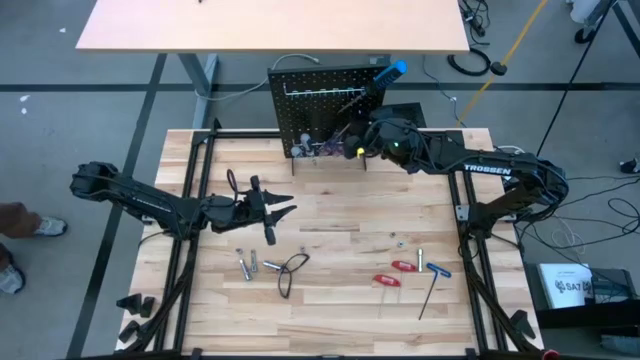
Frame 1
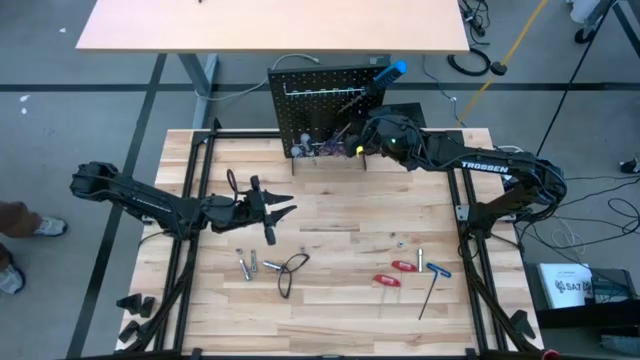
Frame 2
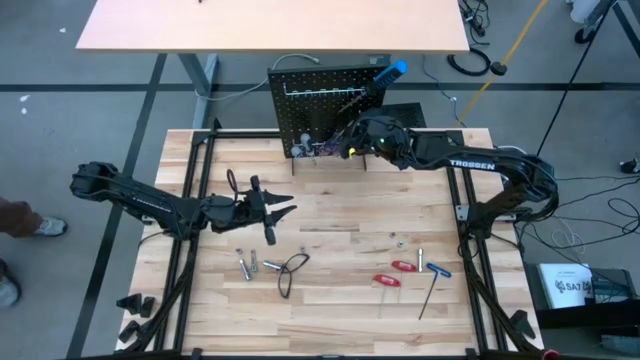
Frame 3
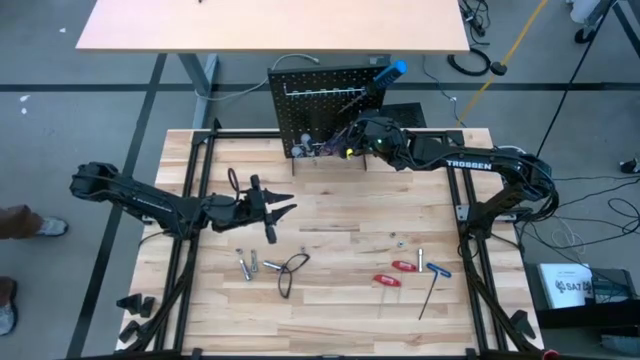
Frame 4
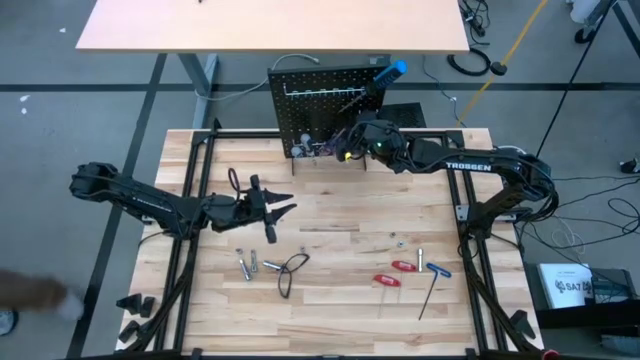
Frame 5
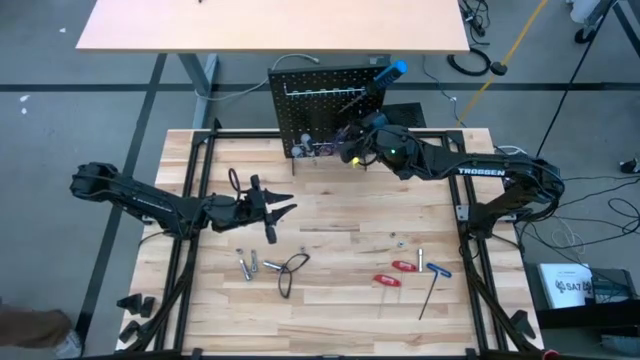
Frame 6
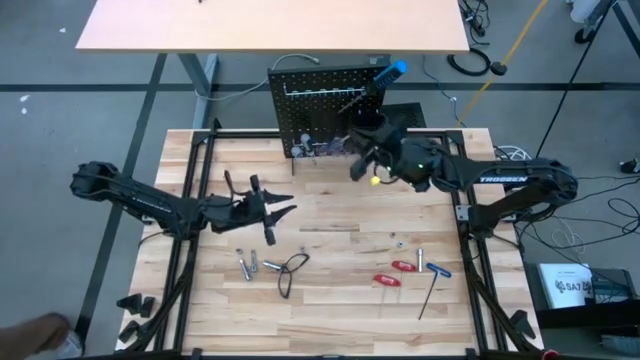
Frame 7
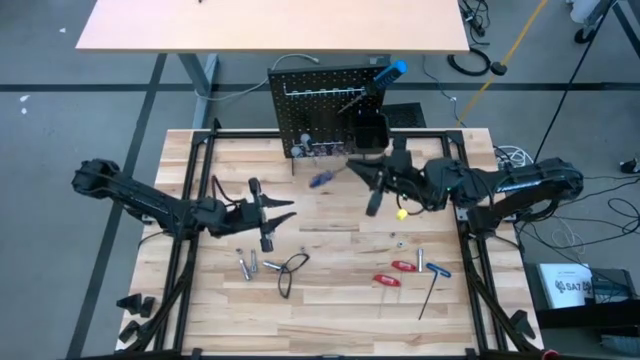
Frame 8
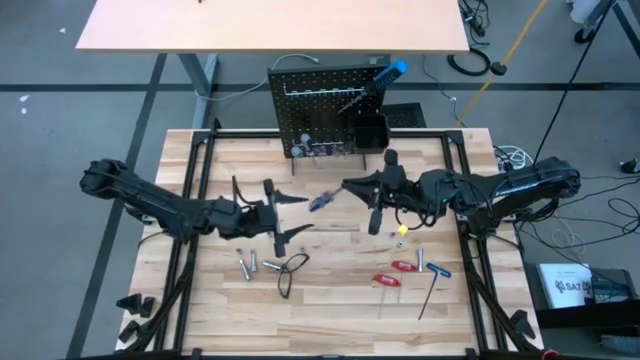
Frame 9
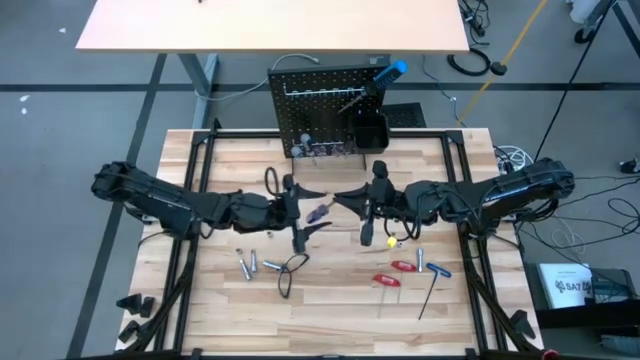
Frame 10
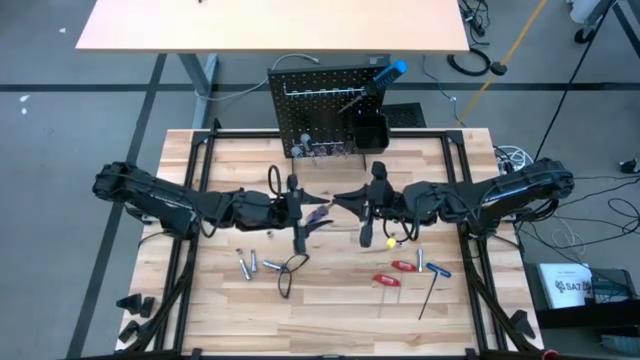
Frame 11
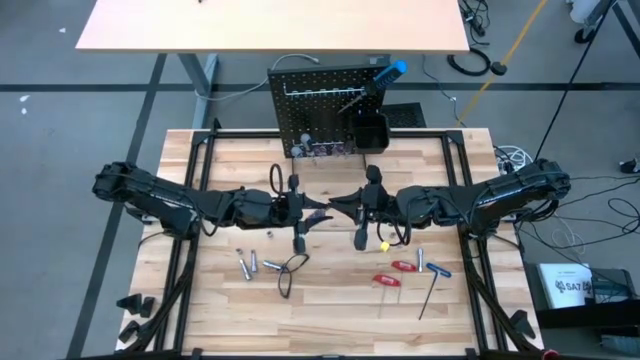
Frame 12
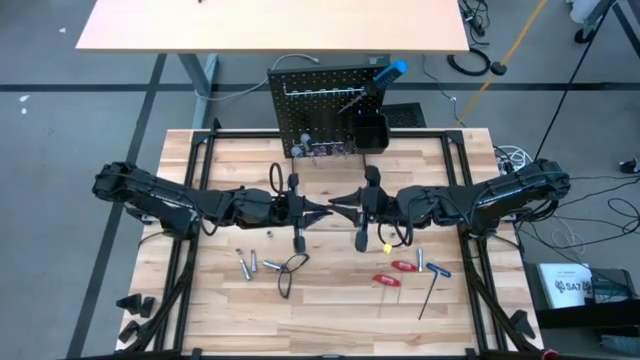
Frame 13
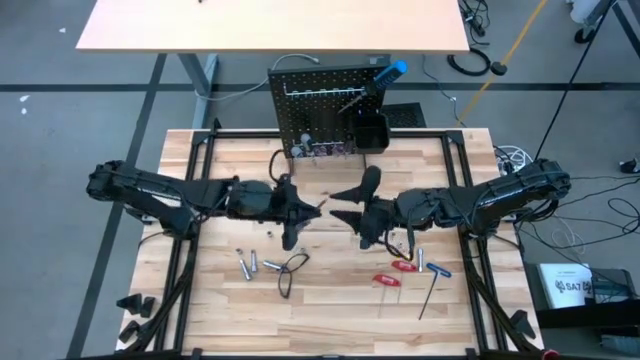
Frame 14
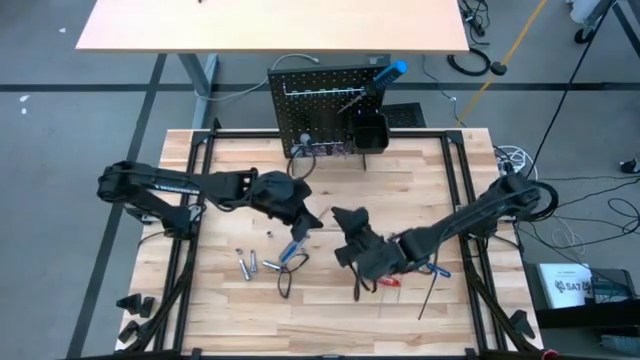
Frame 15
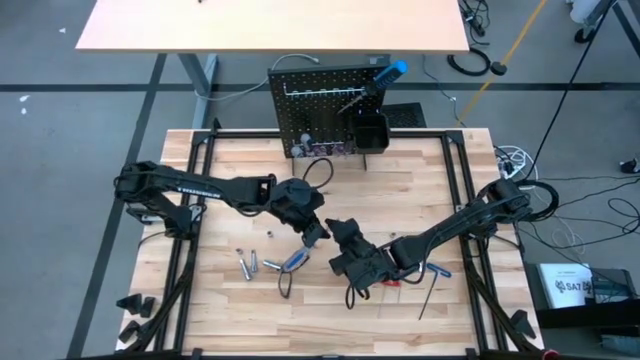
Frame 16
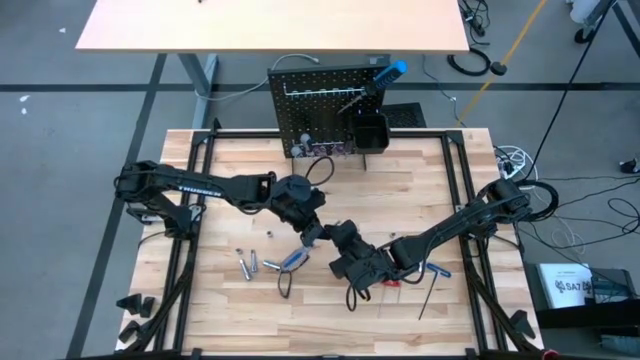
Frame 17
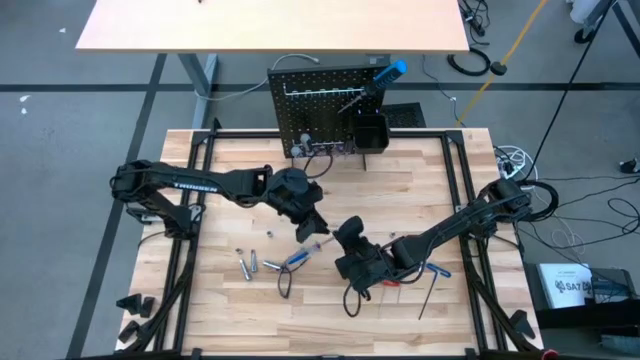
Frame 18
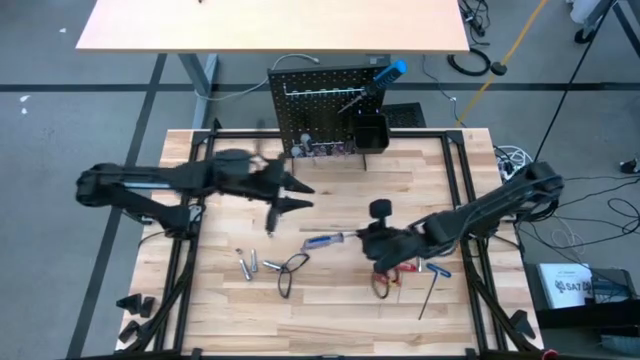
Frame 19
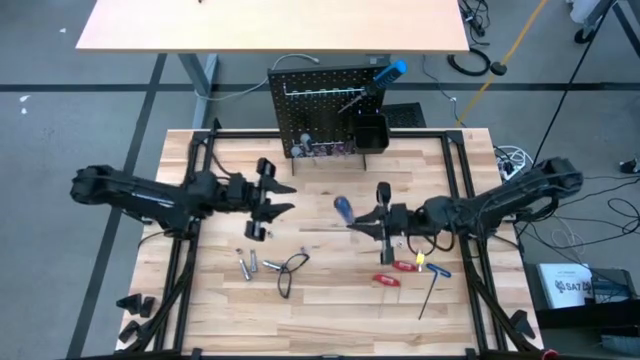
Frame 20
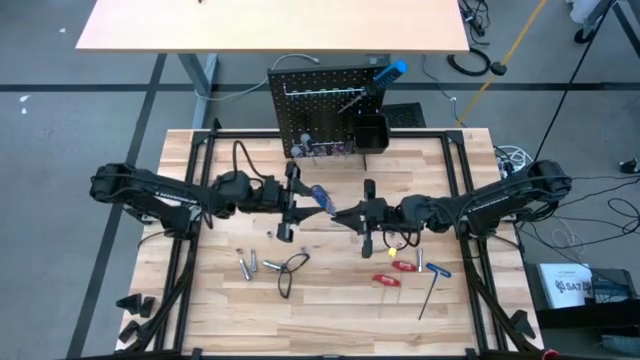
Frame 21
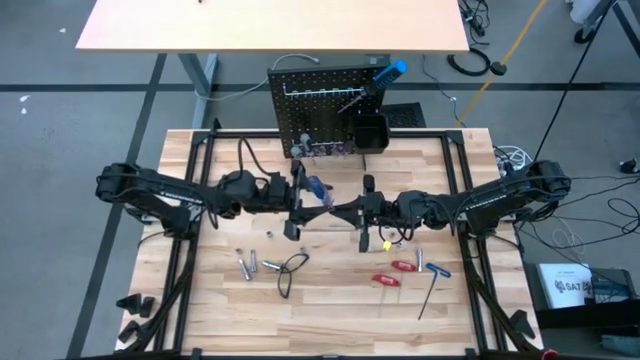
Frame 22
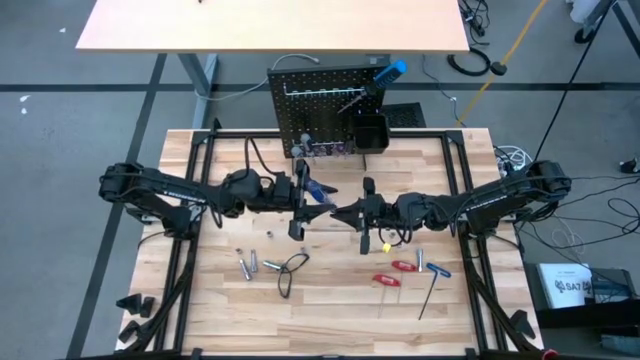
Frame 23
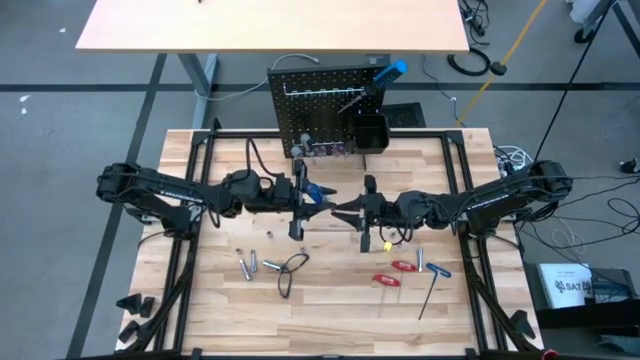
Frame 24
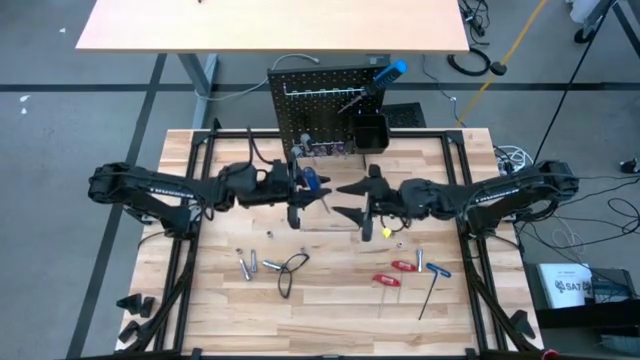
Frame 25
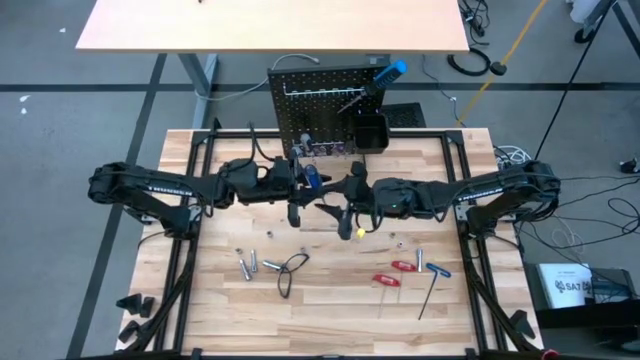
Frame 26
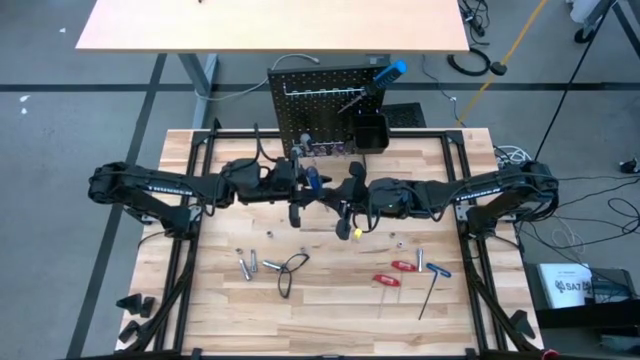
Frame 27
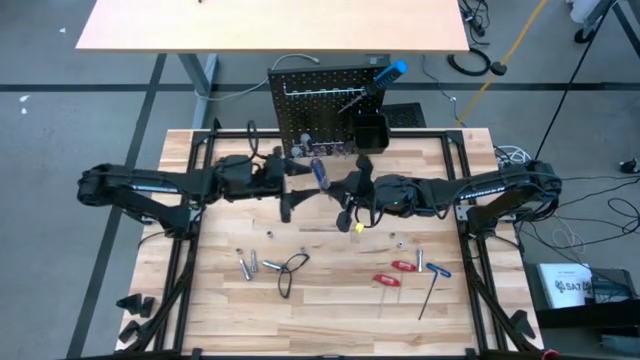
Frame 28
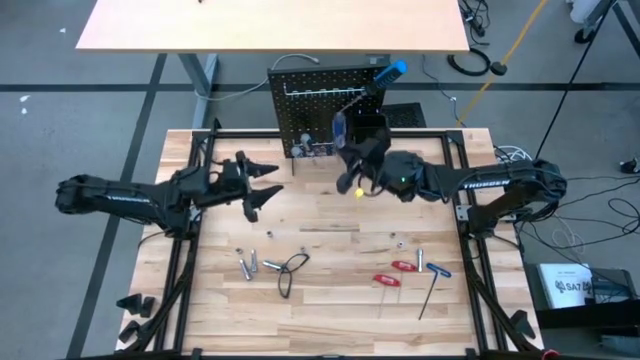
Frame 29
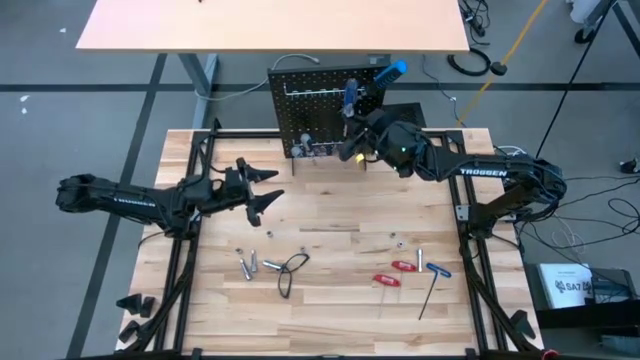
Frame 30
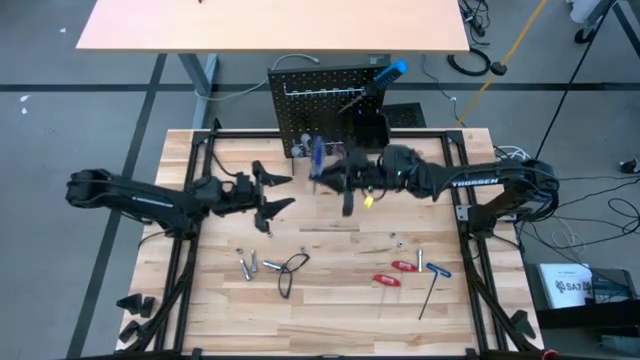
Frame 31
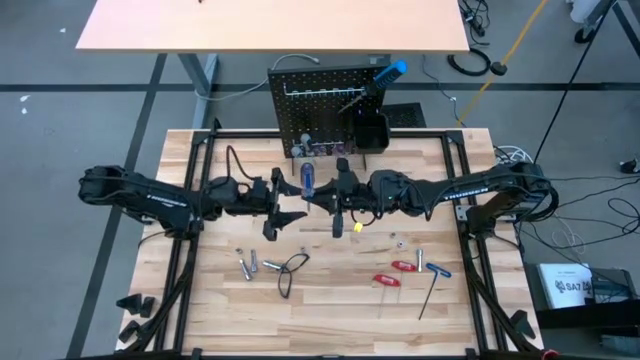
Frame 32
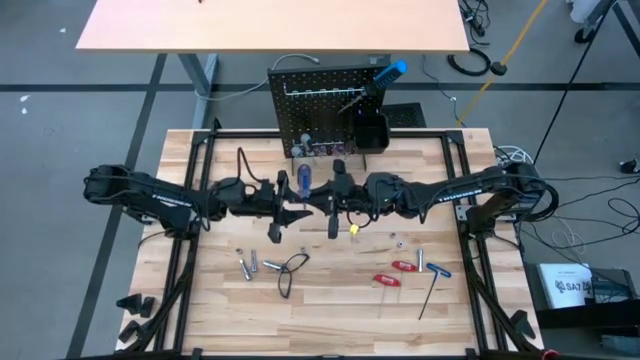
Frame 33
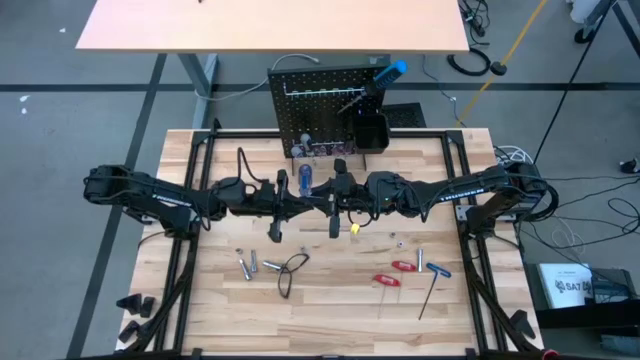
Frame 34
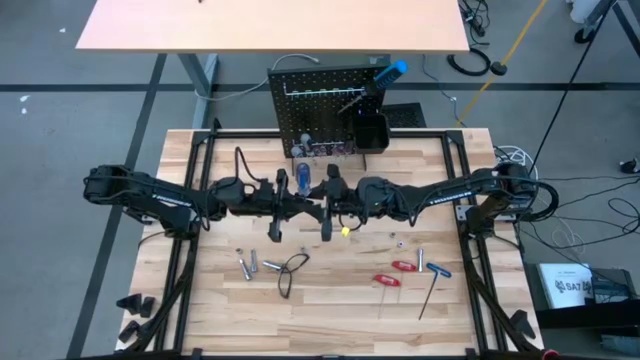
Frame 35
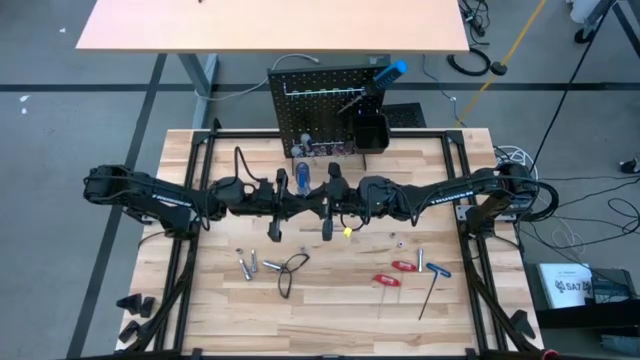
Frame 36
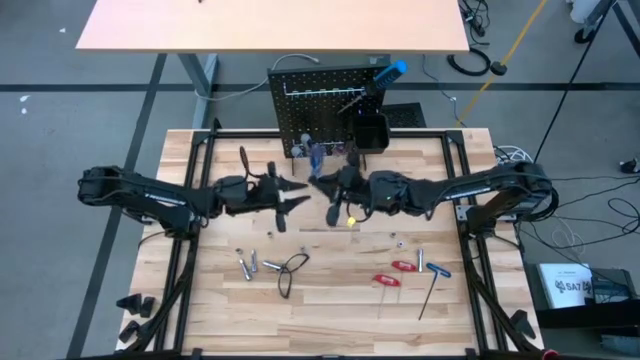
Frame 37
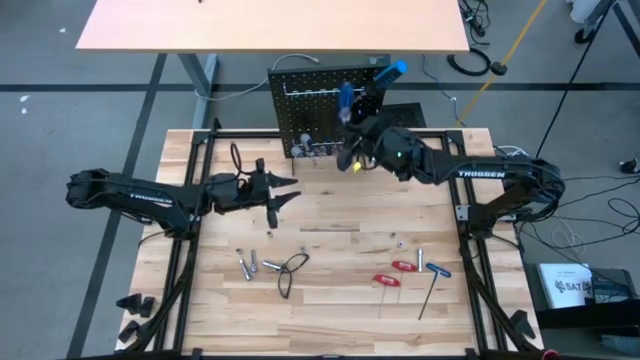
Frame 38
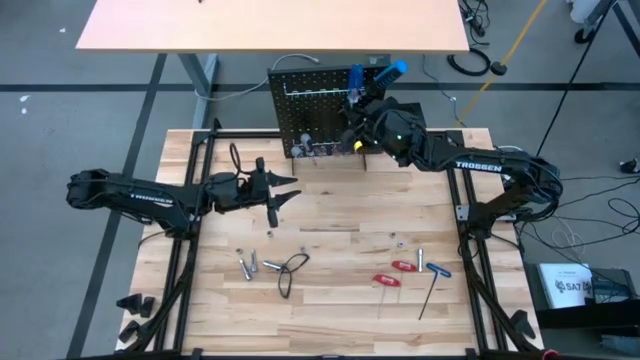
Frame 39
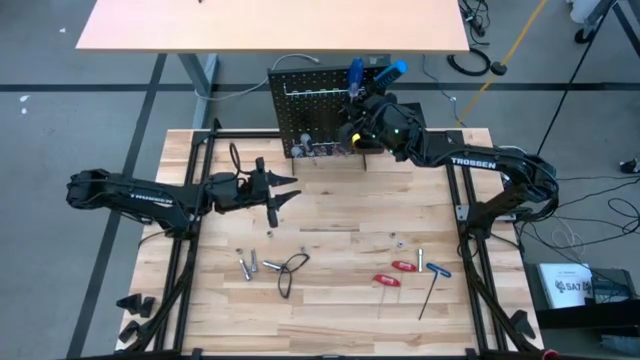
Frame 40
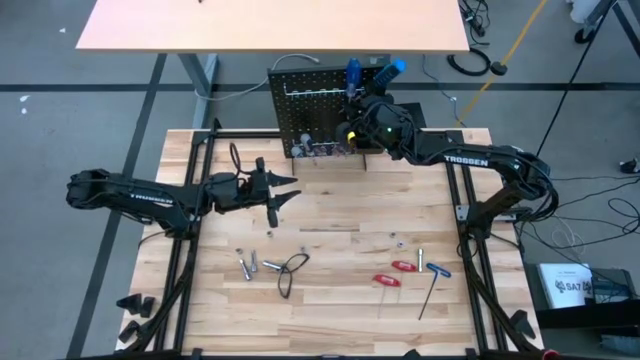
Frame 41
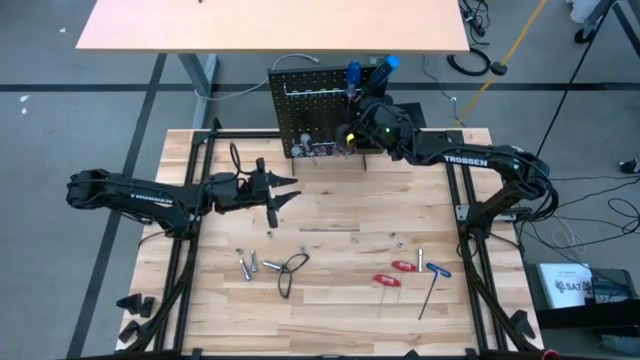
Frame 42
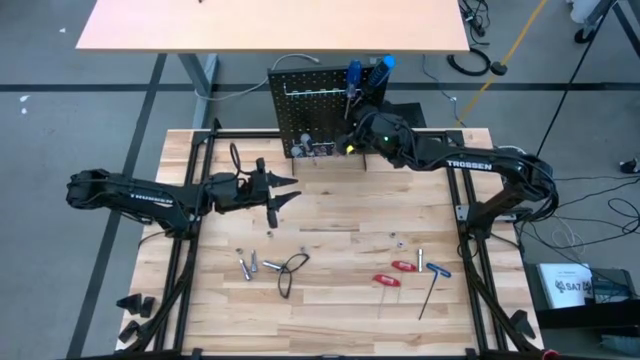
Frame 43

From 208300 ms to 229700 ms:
Task: Hang tools onto peg board
Hang the blue screwdriver on the peg board
